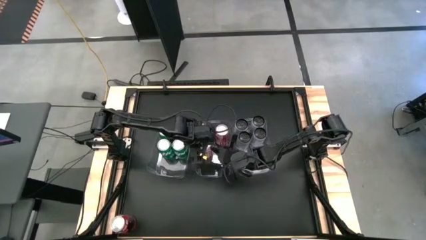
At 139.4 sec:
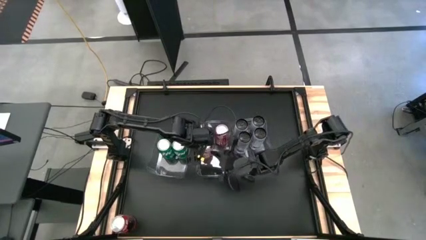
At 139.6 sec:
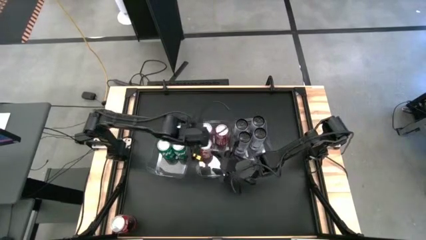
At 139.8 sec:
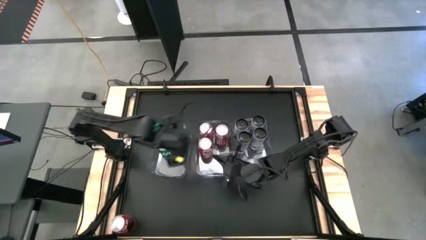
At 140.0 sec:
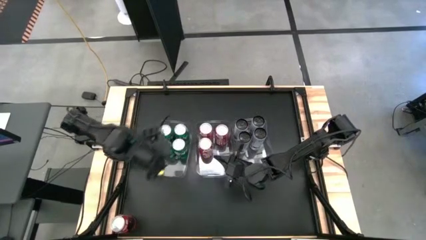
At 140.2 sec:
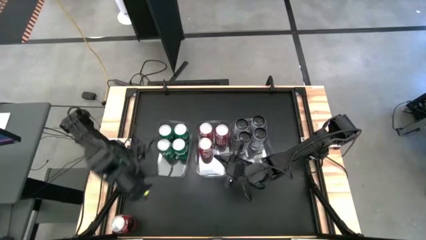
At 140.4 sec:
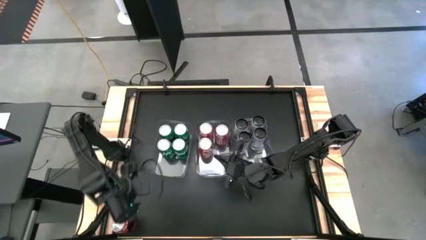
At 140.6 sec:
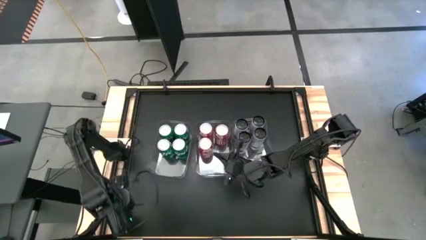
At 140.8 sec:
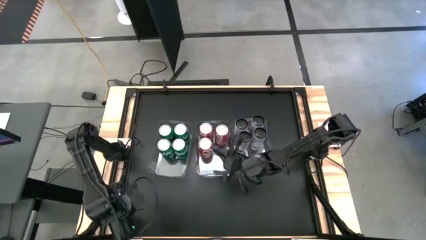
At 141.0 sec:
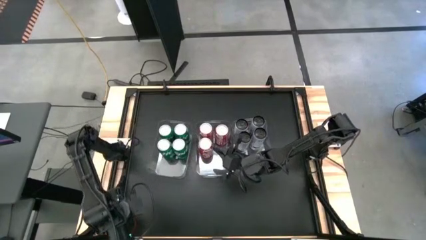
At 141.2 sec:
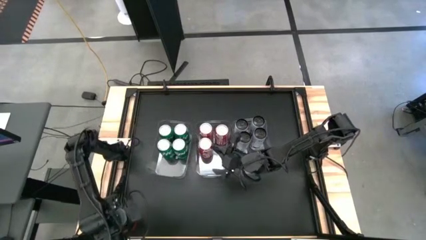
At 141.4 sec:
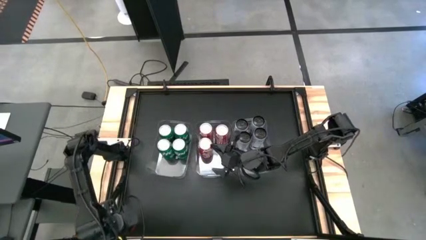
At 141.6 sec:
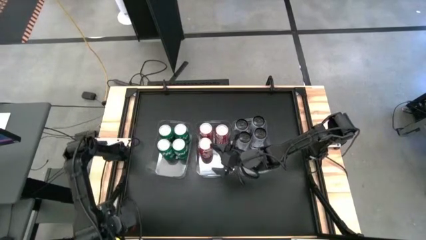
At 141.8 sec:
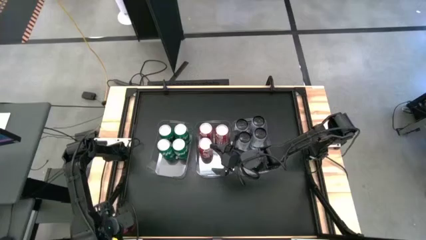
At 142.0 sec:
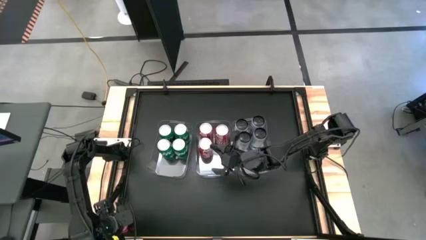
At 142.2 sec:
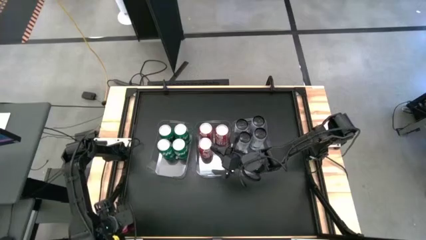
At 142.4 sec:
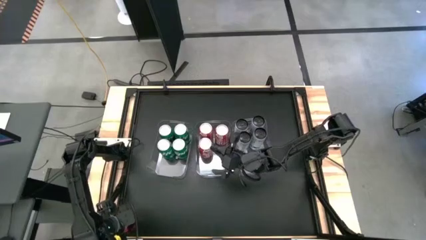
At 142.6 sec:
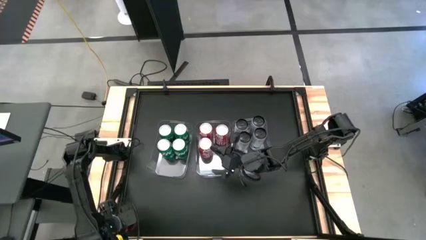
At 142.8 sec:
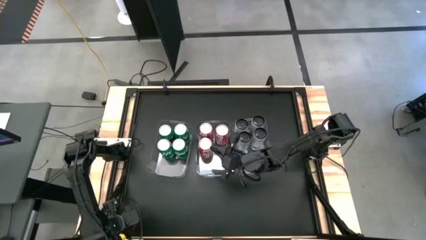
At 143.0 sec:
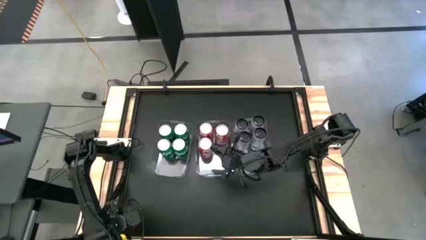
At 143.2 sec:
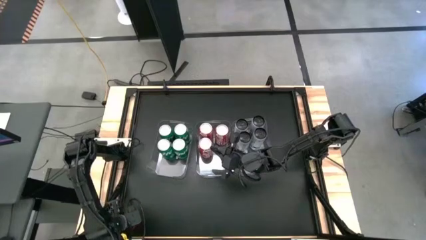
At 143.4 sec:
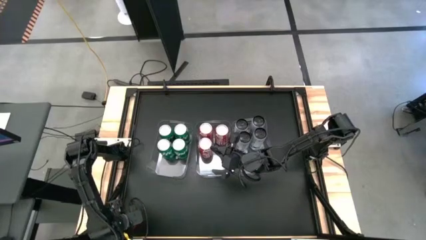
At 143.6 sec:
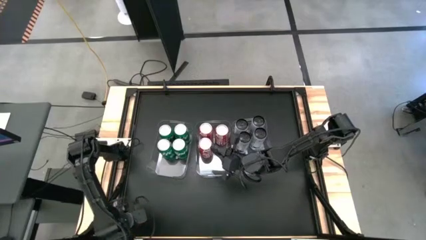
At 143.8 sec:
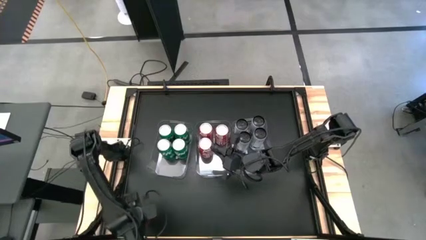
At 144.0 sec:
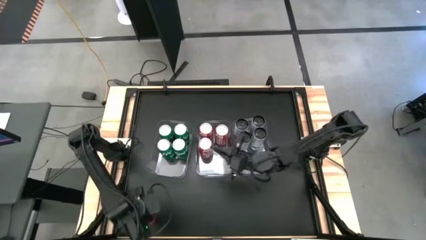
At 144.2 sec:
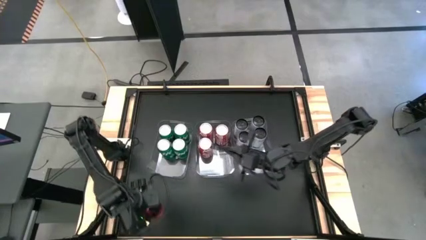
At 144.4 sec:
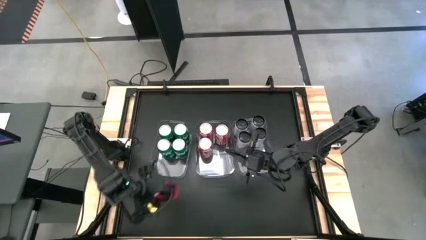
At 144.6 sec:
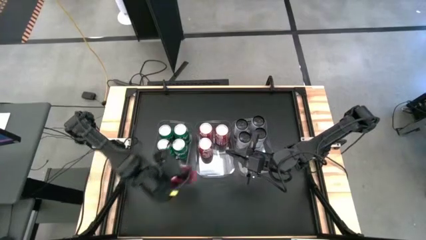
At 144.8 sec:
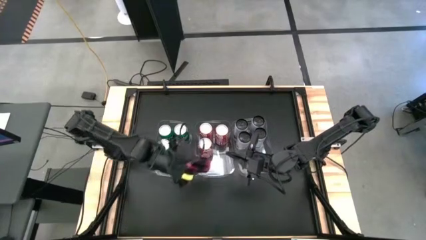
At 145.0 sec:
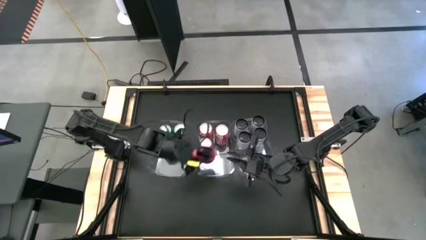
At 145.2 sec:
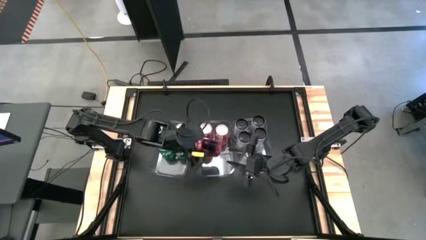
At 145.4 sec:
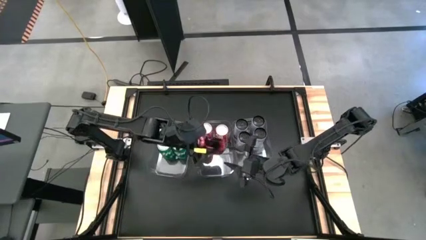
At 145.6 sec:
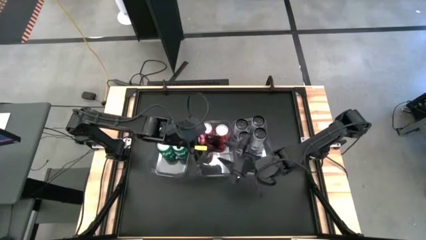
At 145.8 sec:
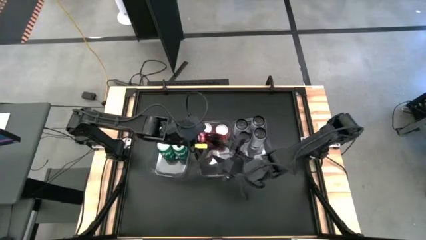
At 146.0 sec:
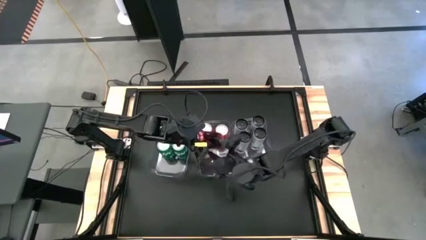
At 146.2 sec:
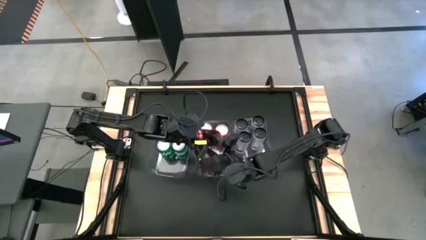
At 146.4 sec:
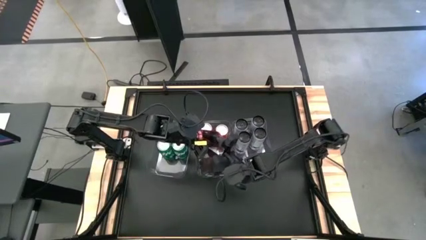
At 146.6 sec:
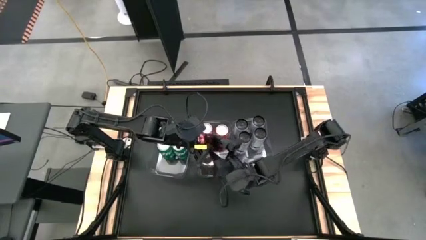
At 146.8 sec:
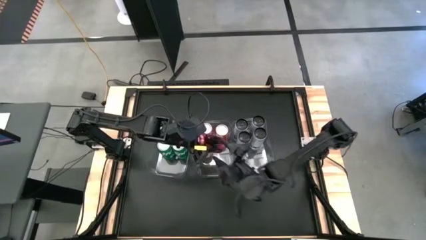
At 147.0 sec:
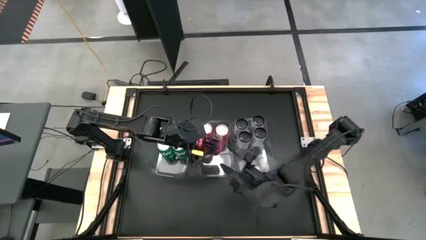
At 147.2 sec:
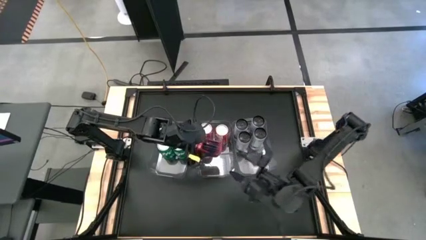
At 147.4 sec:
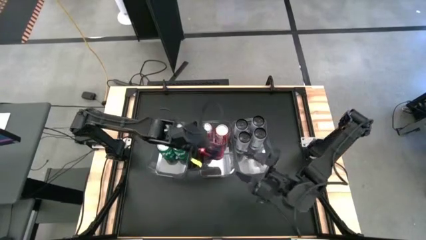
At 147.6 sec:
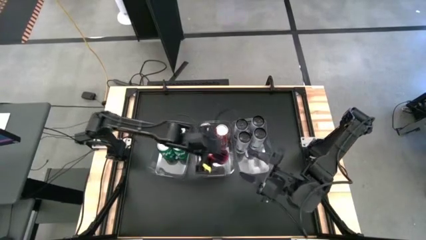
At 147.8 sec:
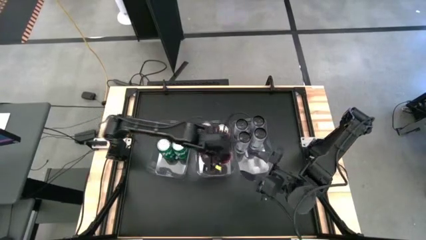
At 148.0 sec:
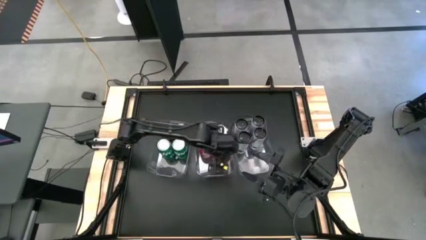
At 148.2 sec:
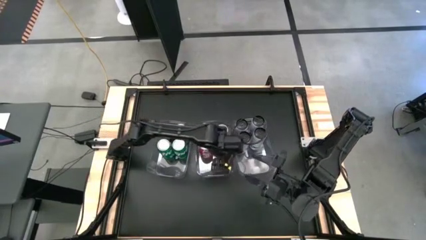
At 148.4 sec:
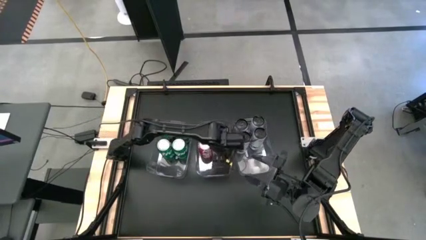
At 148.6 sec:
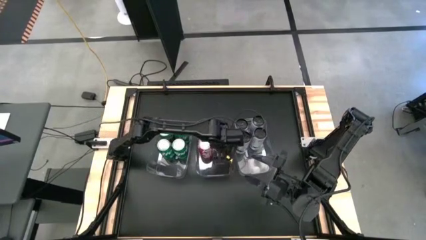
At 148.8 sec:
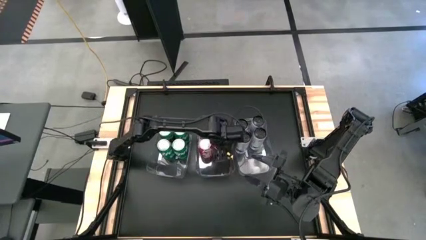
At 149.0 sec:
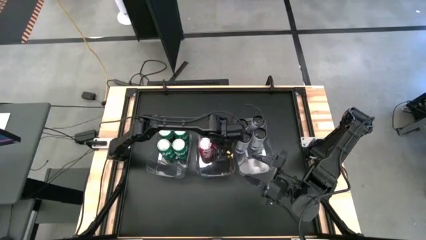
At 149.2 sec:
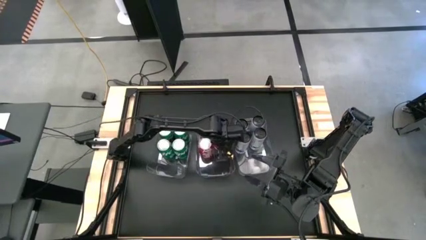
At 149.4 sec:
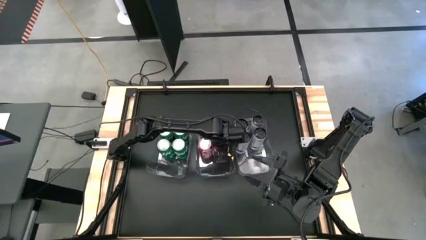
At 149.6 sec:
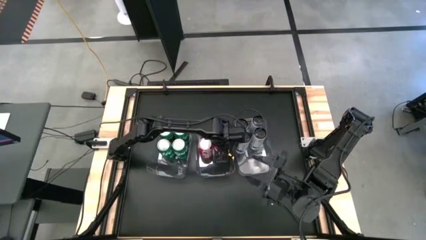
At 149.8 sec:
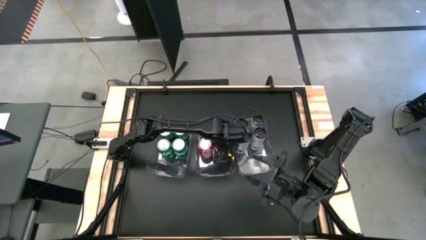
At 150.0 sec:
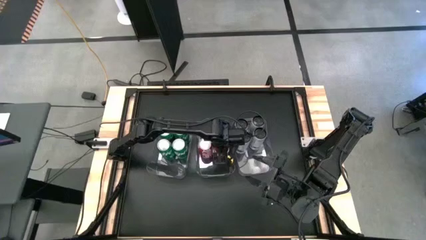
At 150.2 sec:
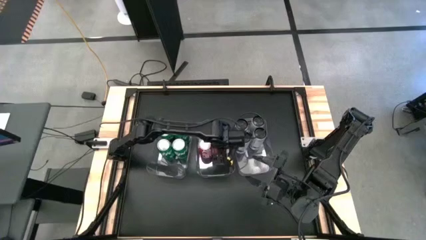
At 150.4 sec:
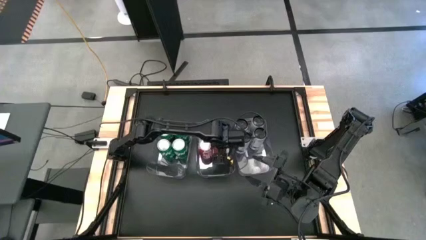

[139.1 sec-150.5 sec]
Task: Sort soda cans
Put the red soda can into the middle transparent bin

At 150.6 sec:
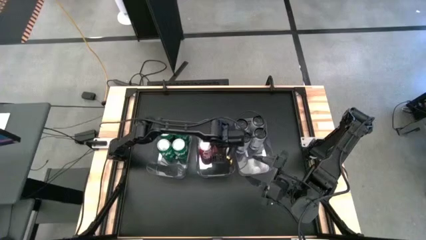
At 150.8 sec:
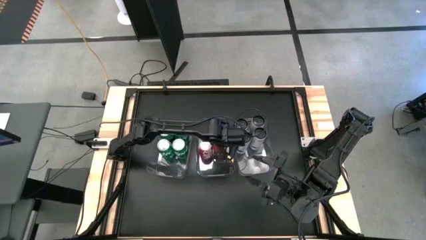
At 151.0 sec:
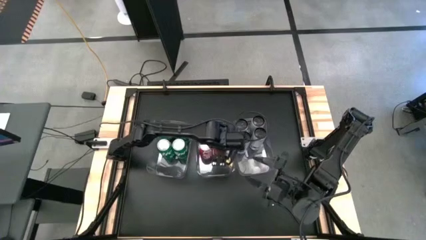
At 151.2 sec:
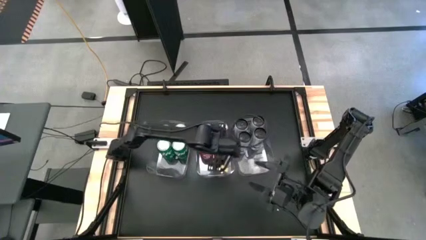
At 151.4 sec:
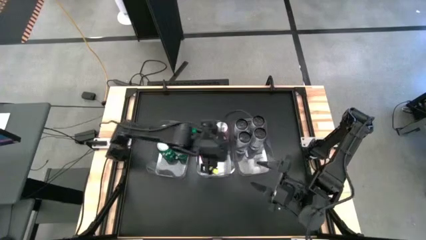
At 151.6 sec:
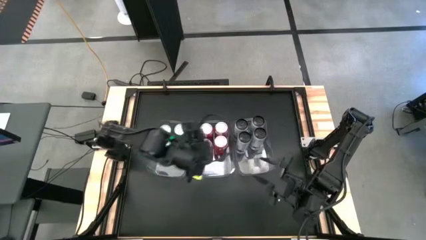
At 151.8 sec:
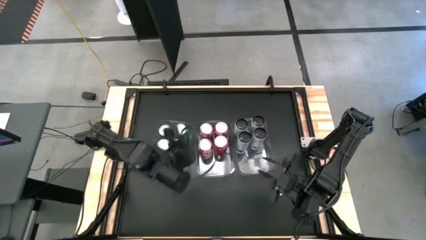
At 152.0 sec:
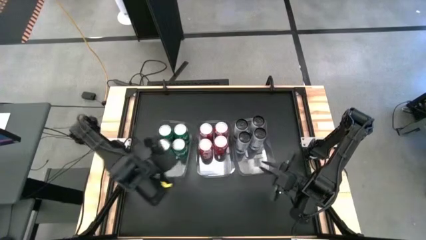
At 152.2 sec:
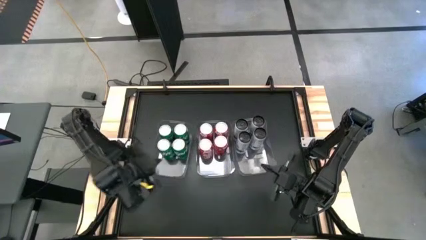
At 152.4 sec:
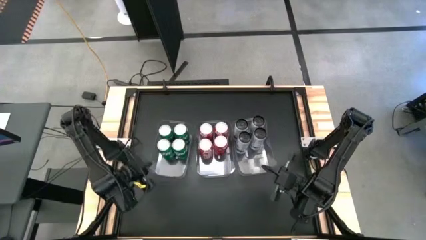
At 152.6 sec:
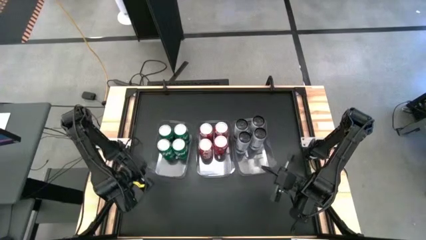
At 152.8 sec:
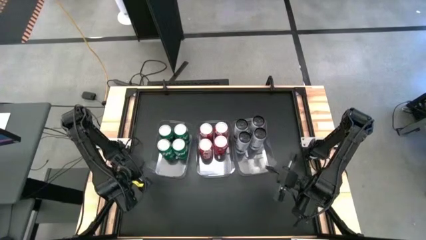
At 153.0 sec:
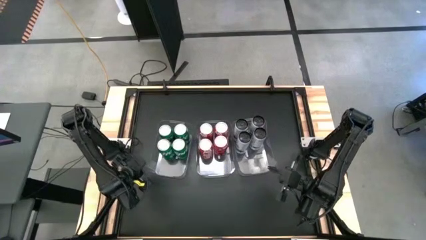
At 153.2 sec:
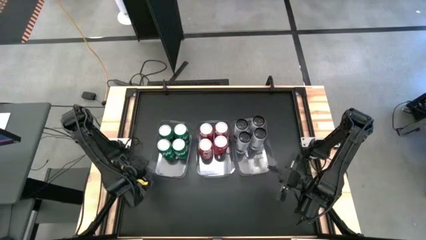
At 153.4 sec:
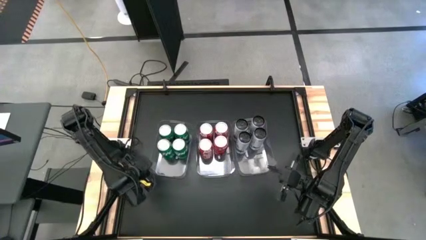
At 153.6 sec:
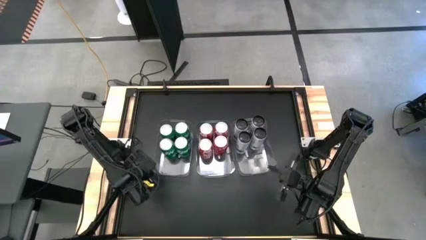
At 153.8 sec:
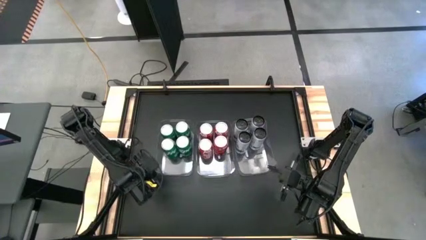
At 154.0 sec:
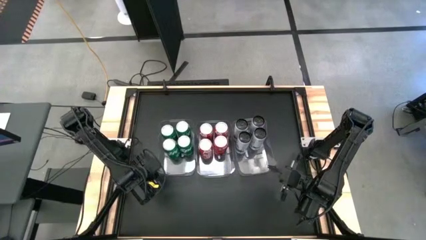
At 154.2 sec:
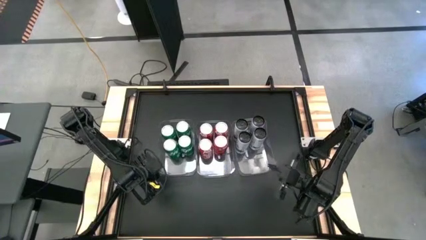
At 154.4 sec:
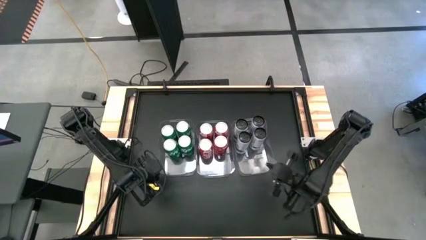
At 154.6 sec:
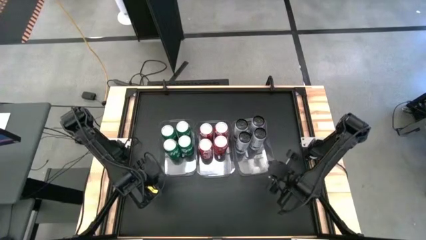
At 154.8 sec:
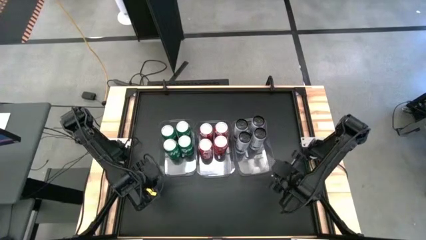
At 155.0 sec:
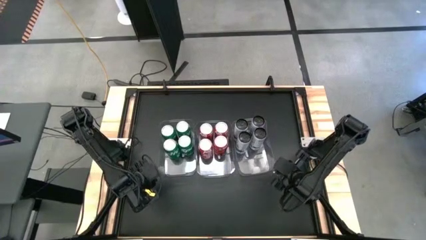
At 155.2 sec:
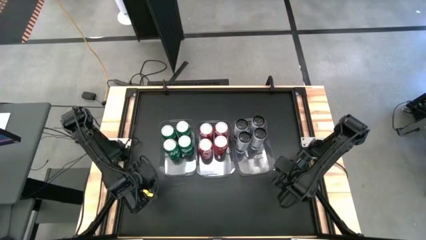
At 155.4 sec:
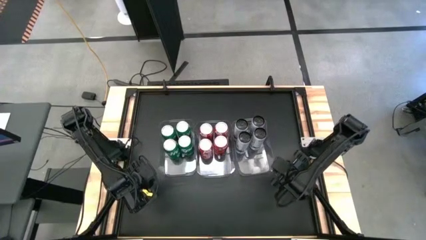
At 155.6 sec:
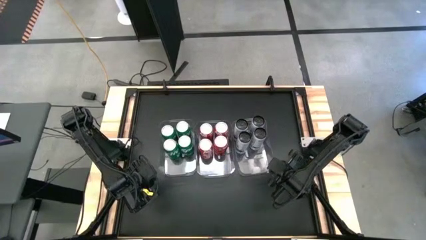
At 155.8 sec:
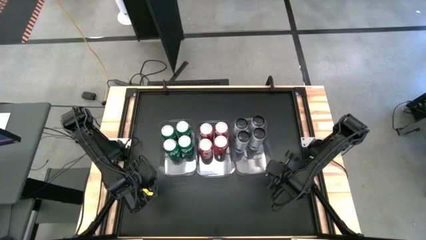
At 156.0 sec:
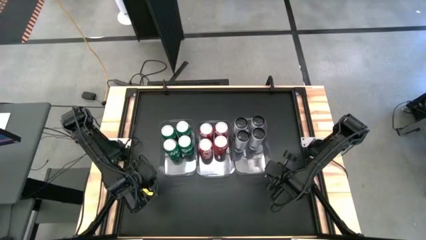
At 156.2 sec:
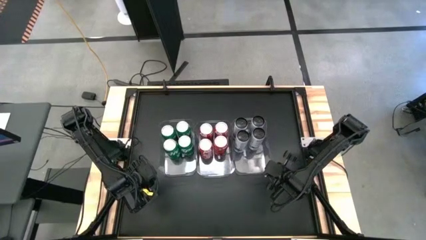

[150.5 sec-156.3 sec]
Adjust the transparent bins to align them on the table
